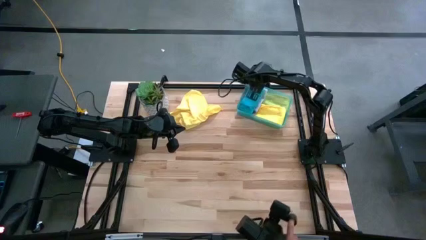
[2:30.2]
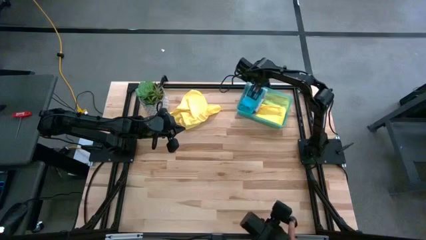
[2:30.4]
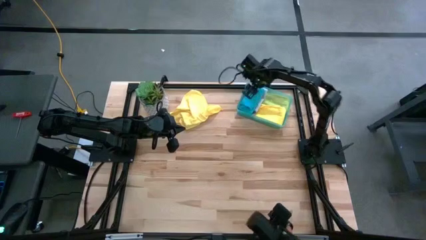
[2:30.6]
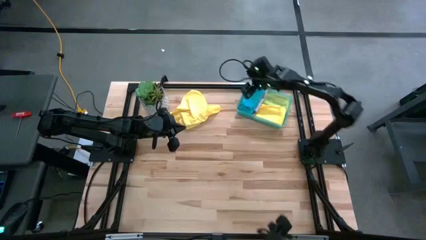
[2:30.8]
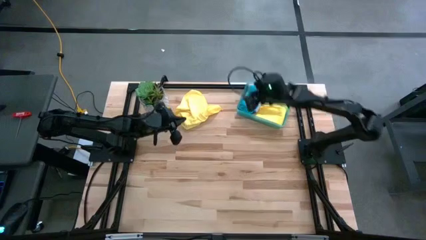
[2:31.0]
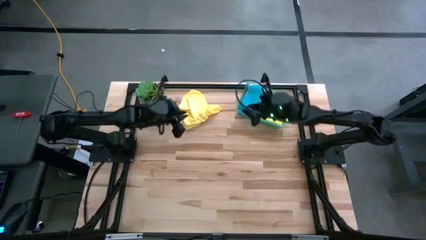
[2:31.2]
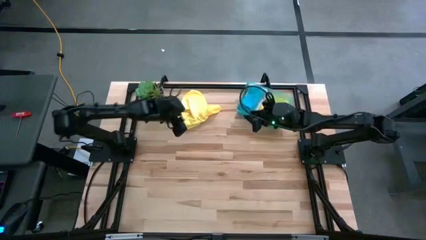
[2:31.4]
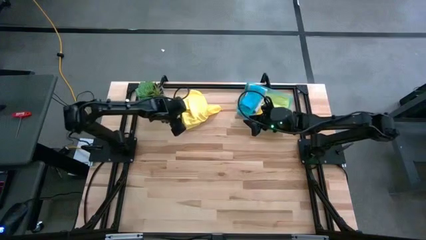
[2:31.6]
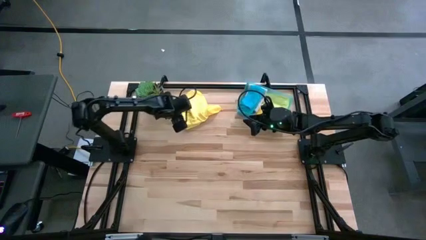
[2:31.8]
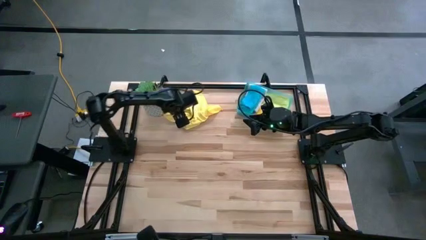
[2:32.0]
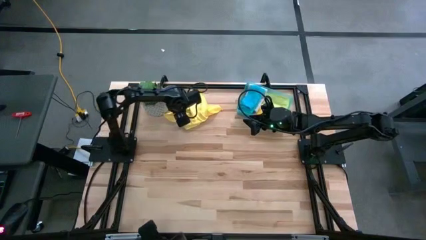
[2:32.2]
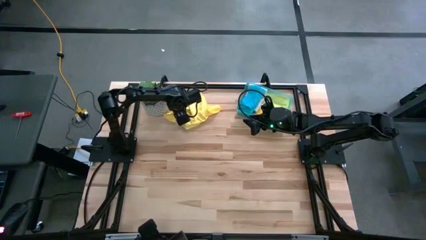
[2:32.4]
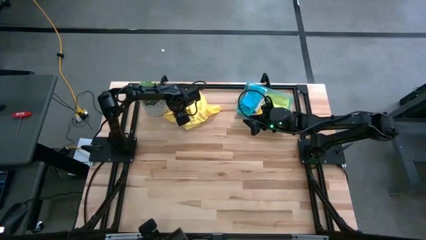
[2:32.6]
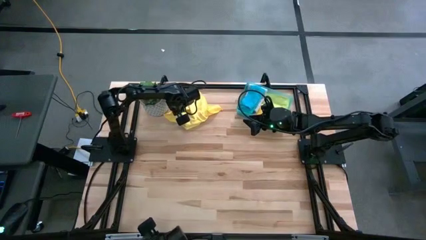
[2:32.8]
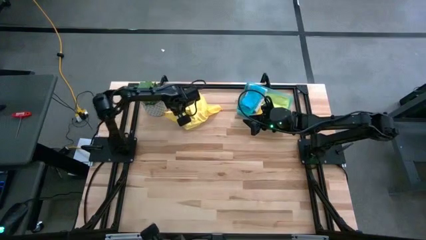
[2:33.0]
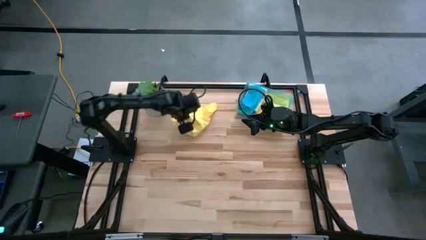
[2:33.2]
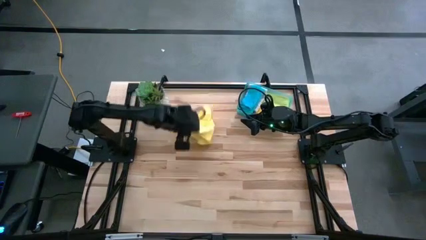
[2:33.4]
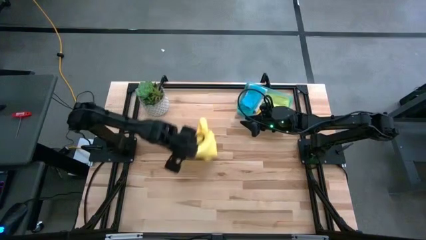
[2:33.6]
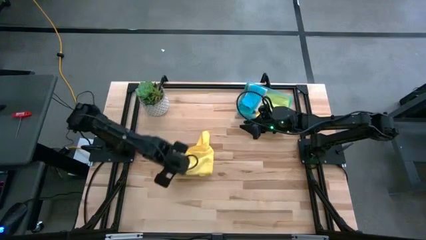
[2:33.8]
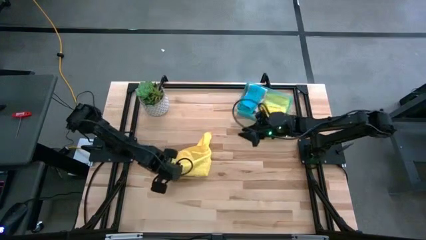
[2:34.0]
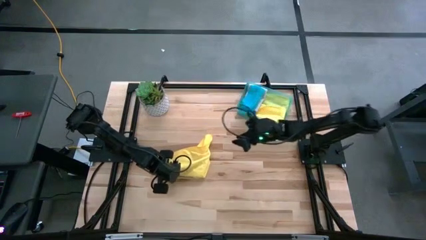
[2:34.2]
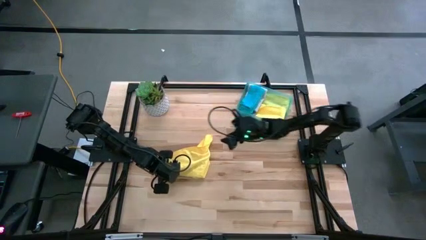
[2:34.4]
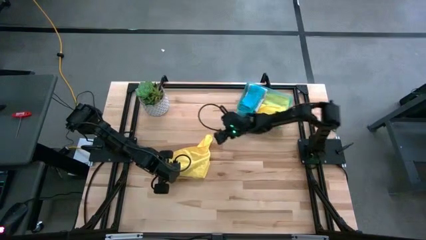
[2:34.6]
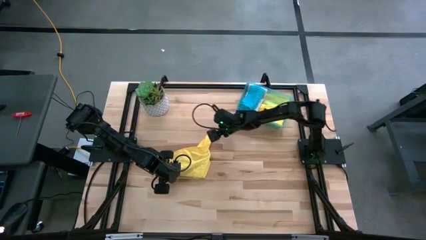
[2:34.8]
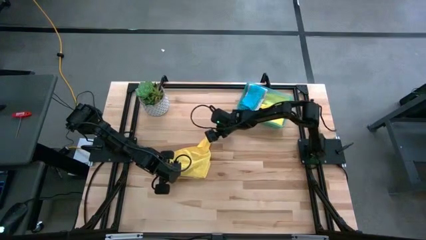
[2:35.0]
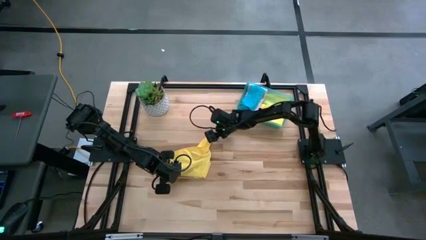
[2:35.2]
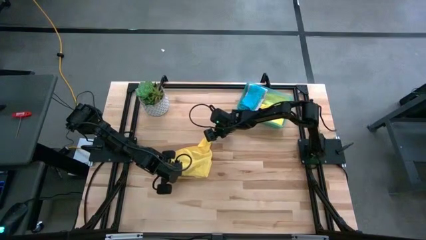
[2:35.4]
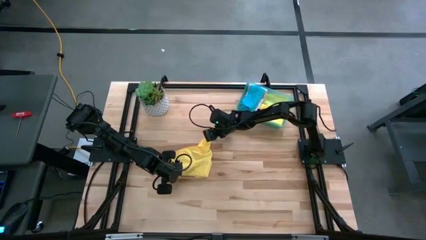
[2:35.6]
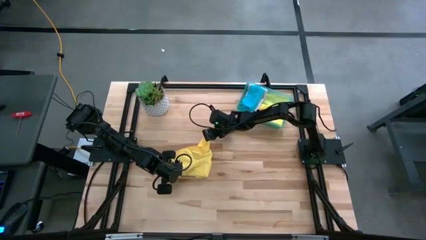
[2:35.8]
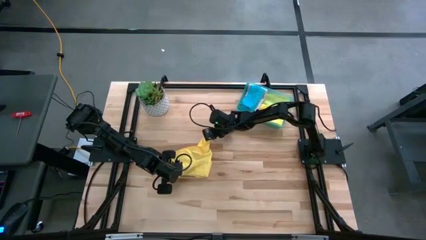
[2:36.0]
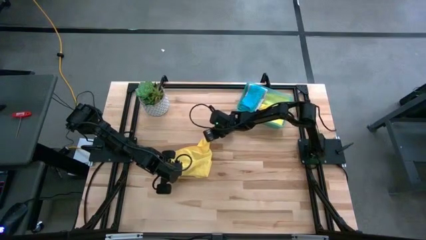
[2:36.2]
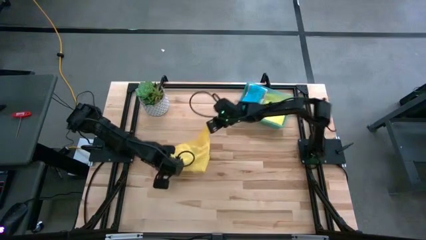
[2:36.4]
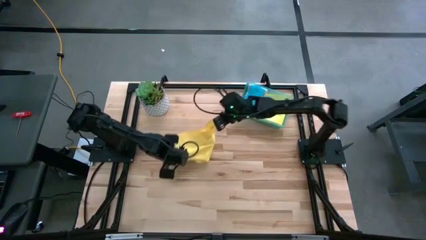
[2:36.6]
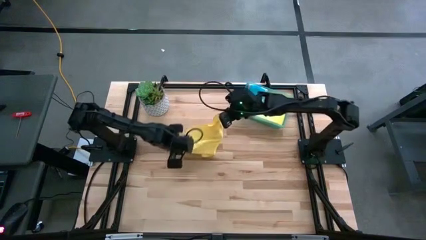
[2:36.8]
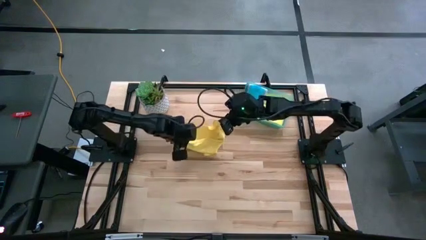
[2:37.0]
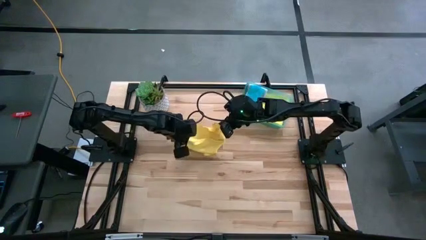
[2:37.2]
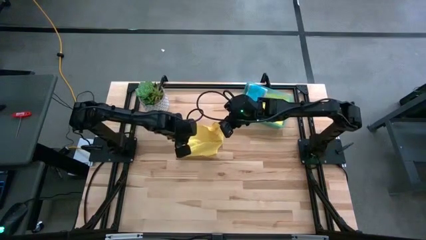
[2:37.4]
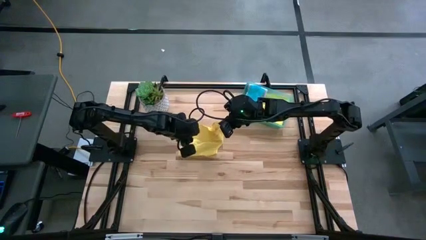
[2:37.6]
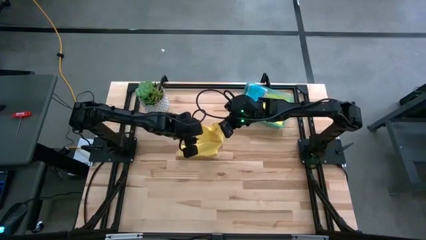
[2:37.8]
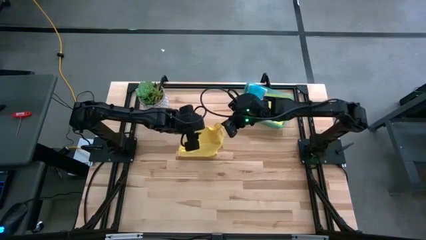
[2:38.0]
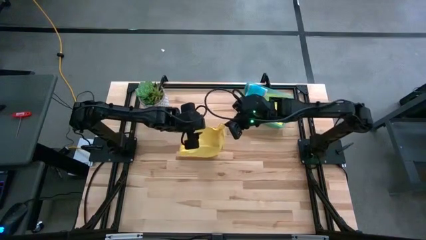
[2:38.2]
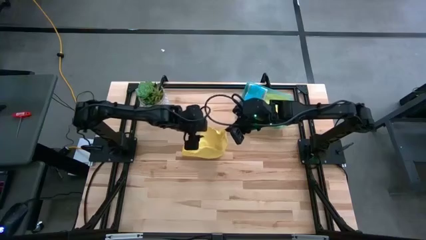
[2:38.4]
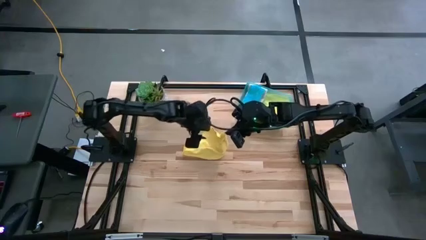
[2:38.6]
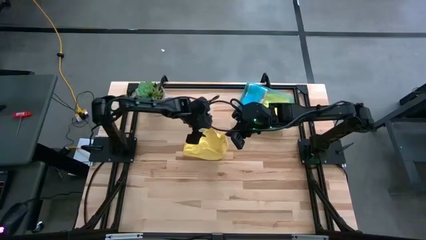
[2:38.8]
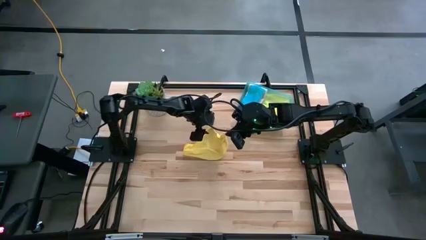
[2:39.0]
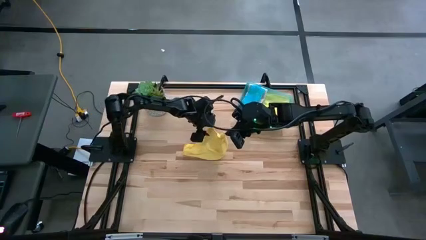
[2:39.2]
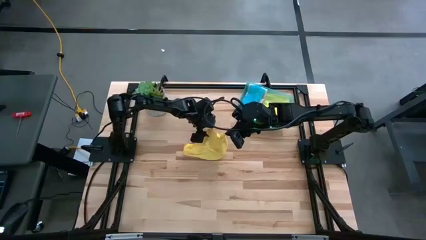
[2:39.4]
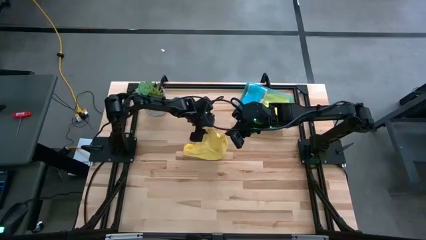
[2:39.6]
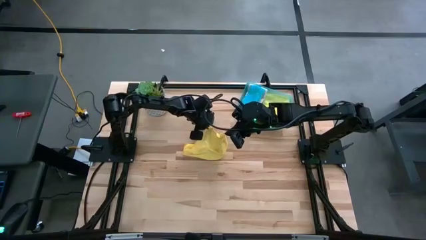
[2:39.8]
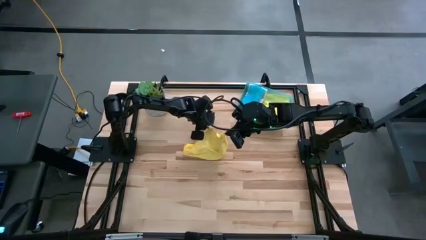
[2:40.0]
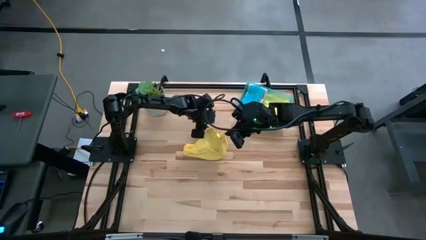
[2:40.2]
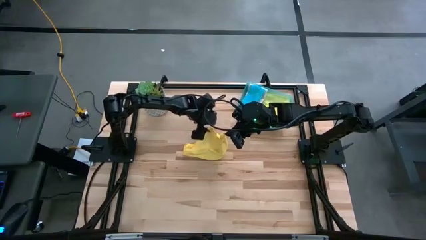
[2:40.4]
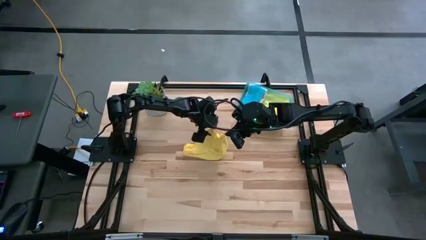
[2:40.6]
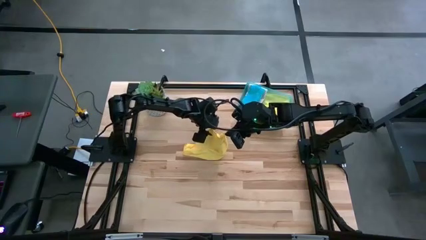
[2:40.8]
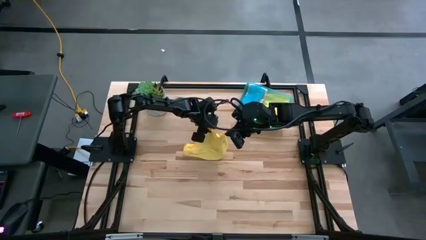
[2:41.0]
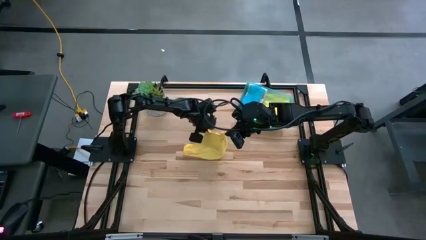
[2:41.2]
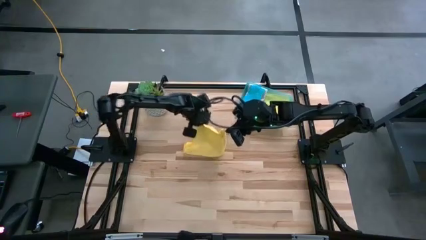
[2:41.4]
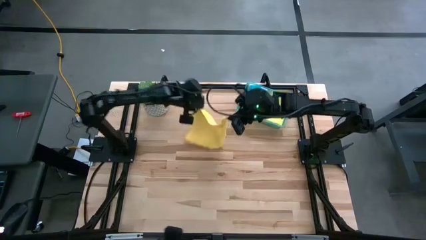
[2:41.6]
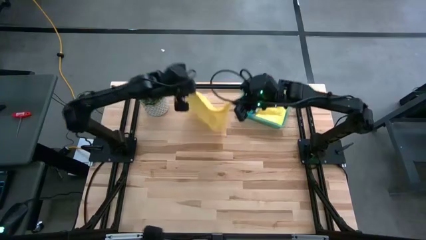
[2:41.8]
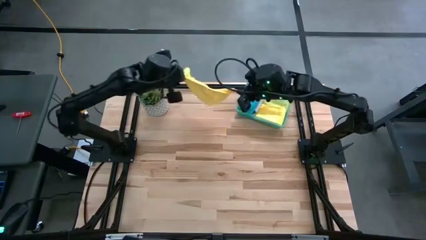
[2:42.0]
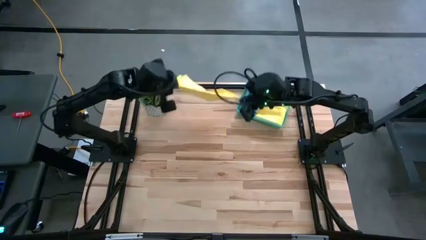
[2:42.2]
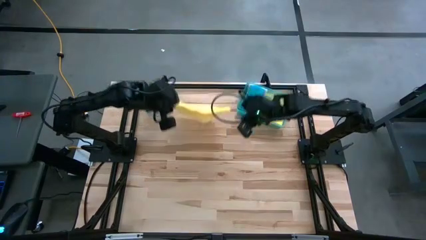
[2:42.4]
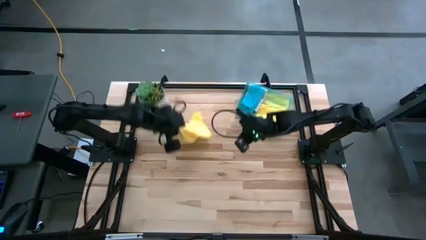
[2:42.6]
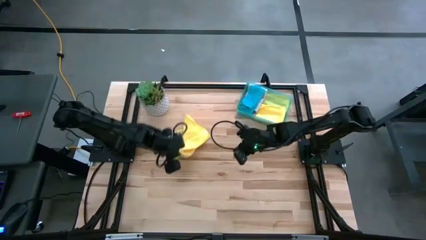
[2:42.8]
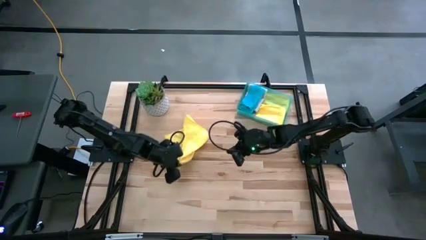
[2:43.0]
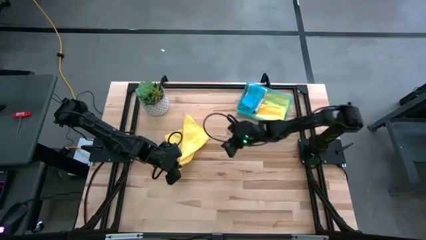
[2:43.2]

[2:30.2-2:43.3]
Task: Fold microfiber towels
Fold the yellow towel
